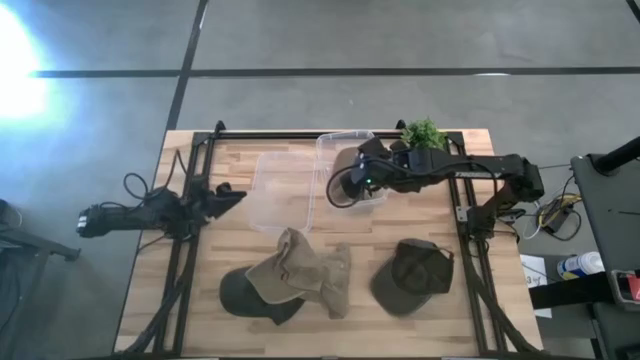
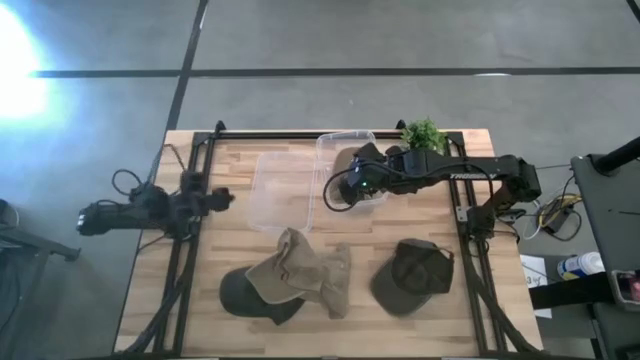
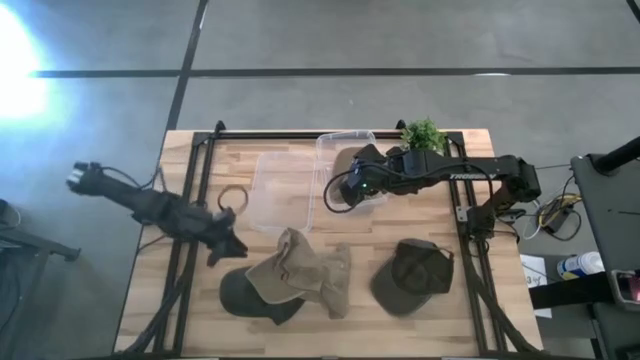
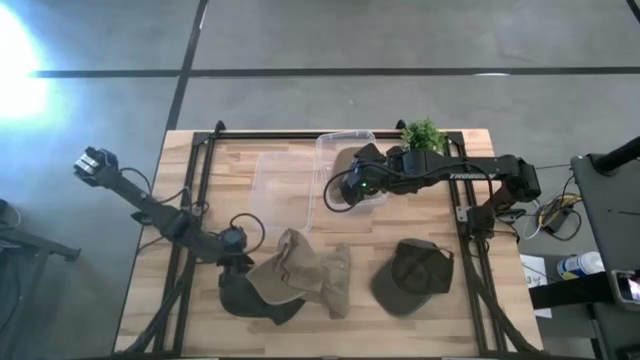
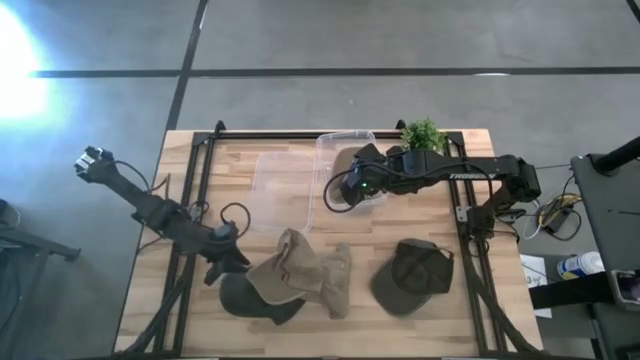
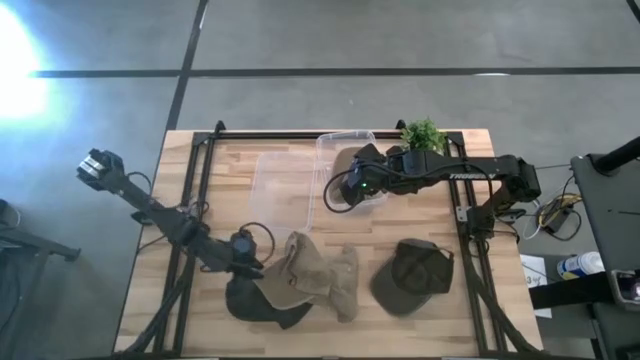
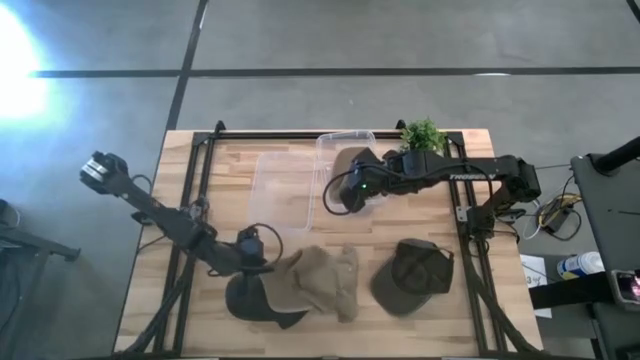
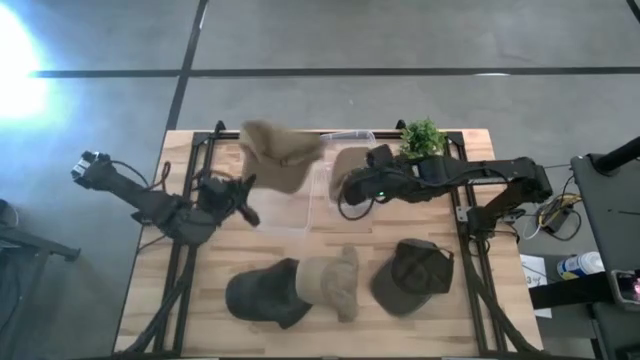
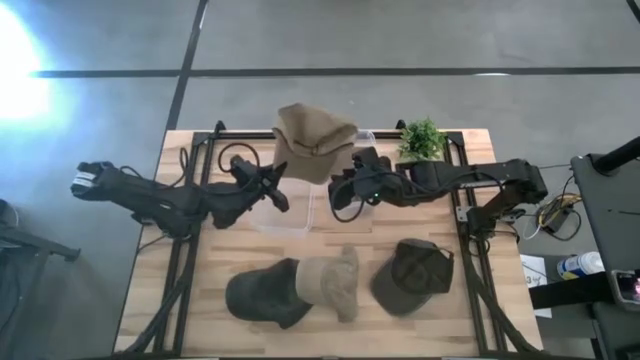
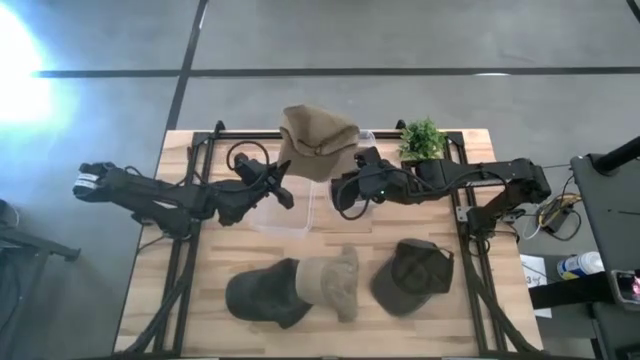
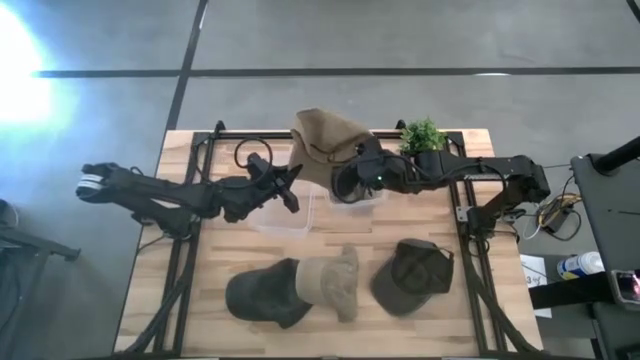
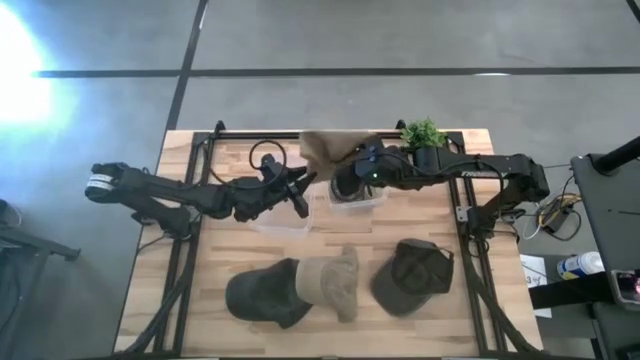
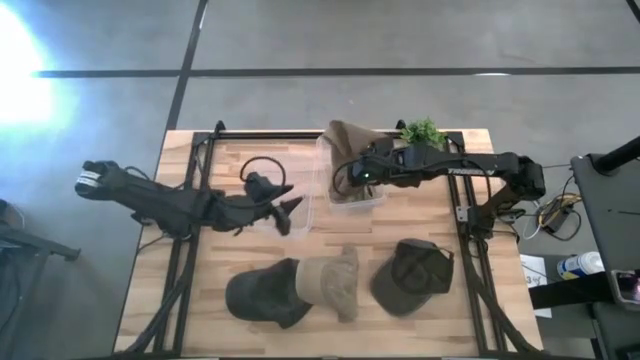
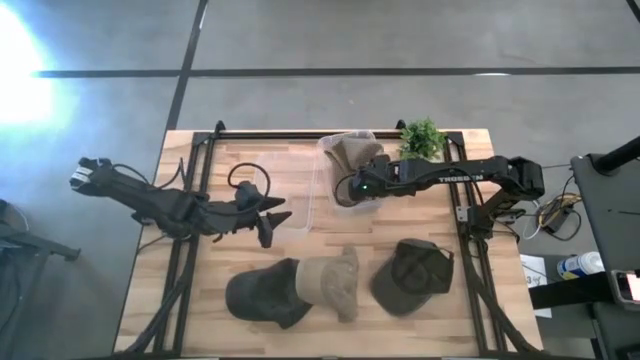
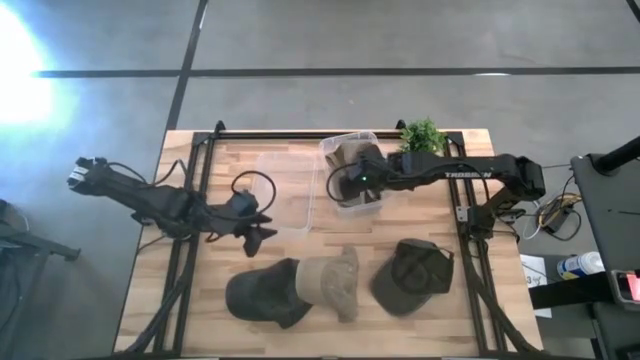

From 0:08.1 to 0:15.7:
Task: Pick & Place hat
Put the left brown cap into the right transparent bin

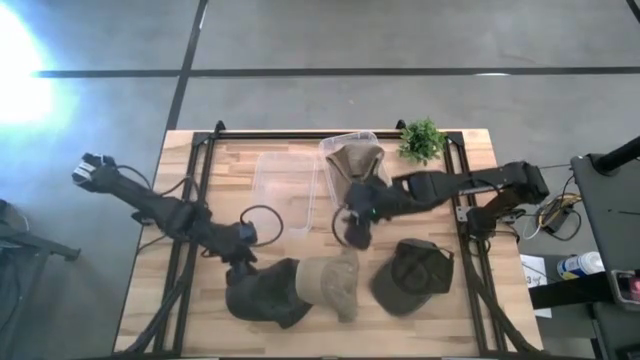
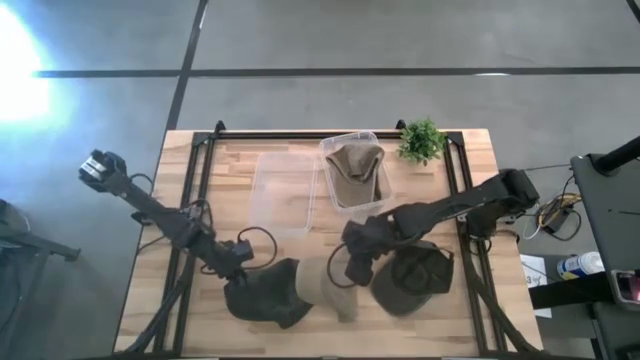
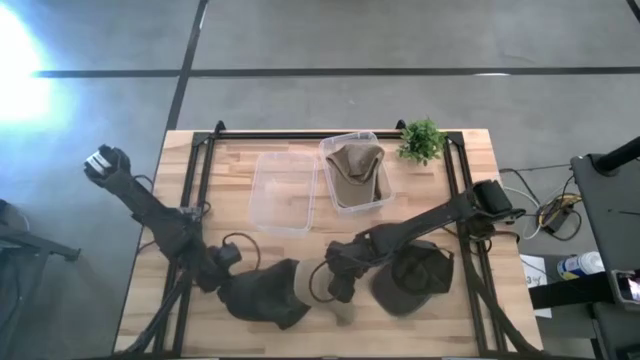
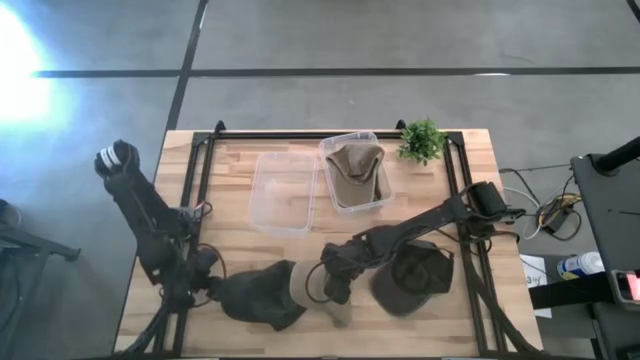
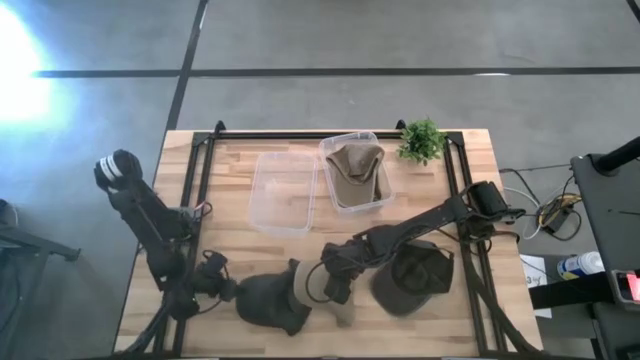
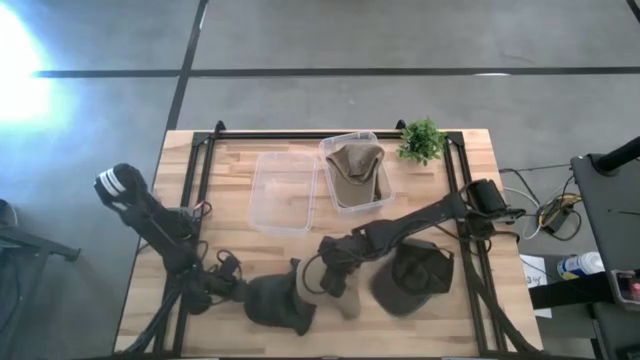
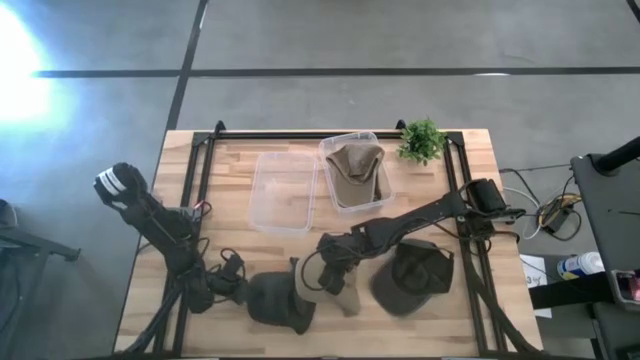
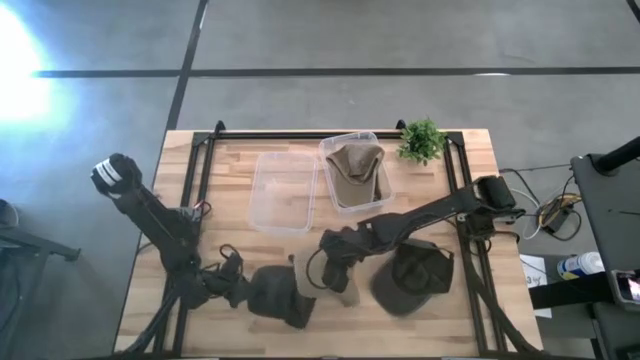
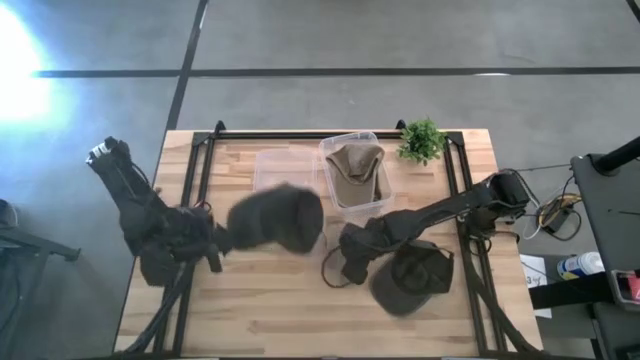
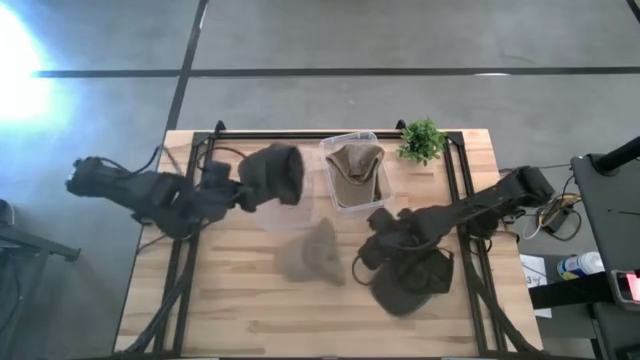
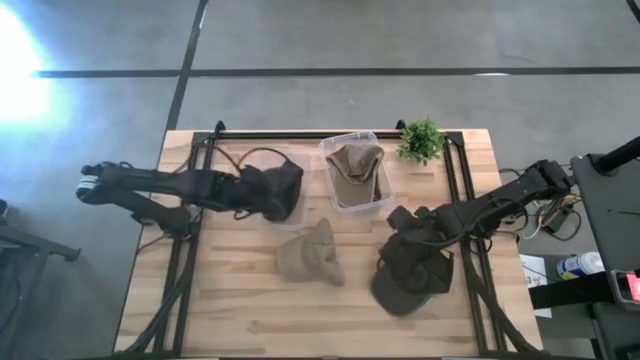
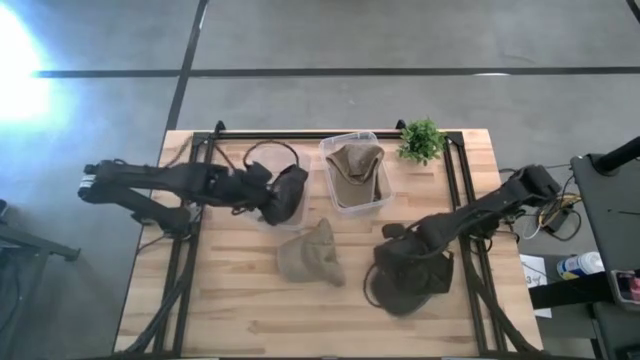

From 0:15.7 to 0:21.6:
Put the left black cap into the left transparent bin

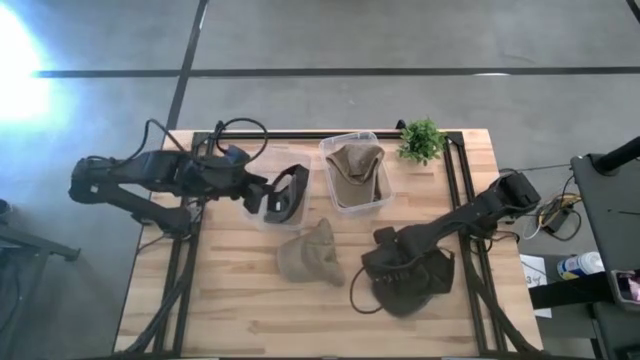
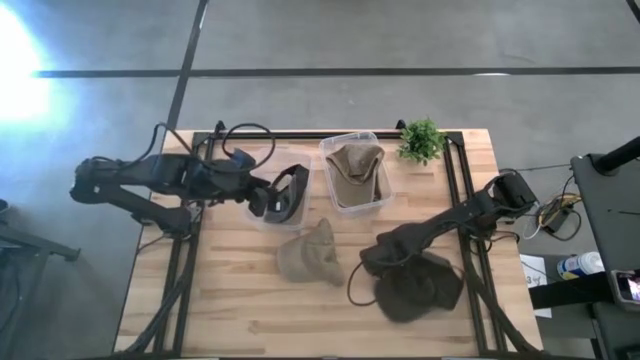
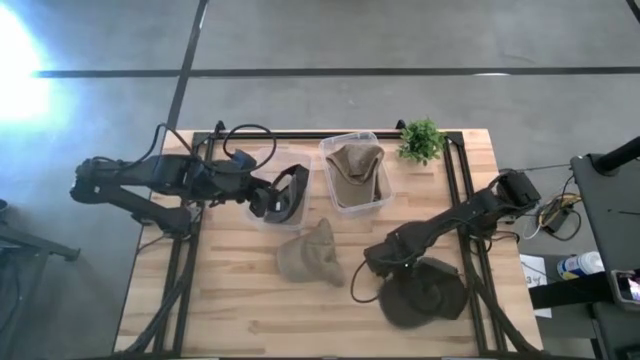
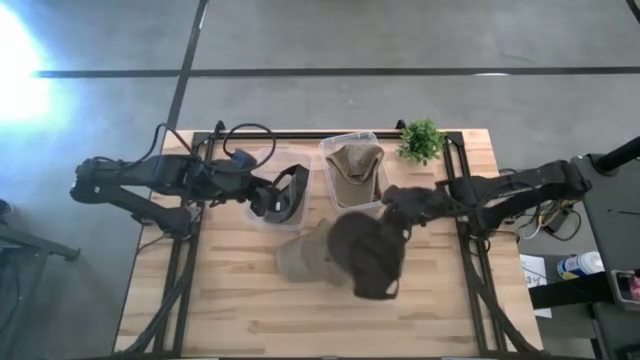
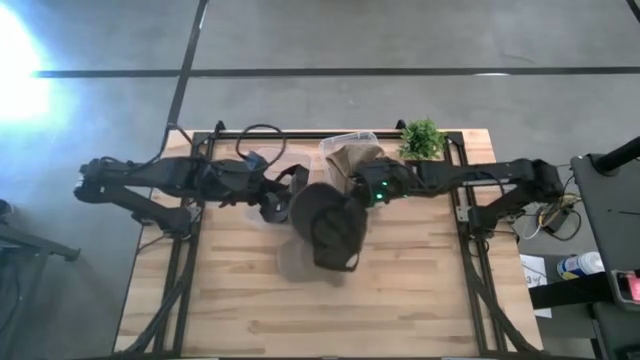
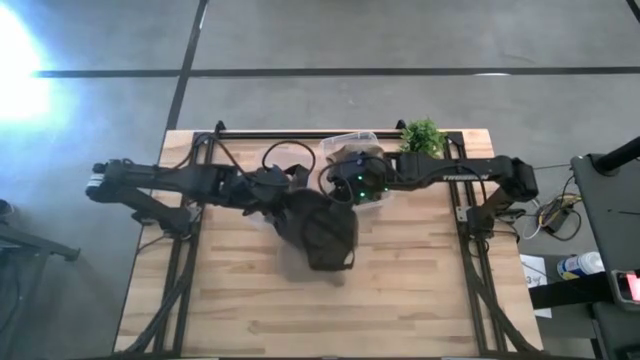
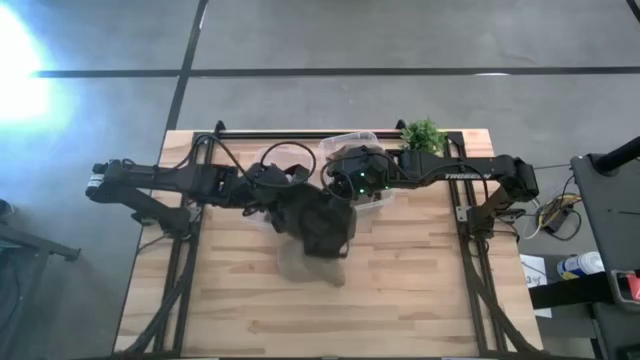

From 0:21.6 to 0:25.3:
Put the black cap into the left transparent bin

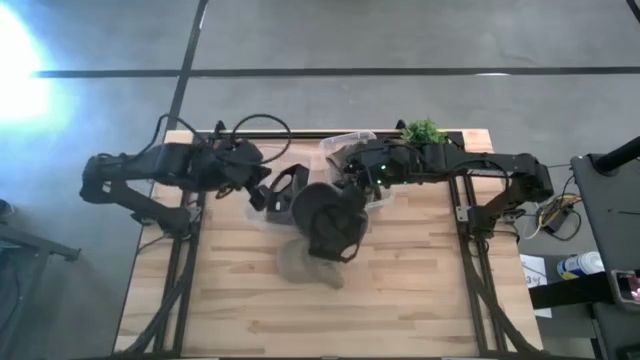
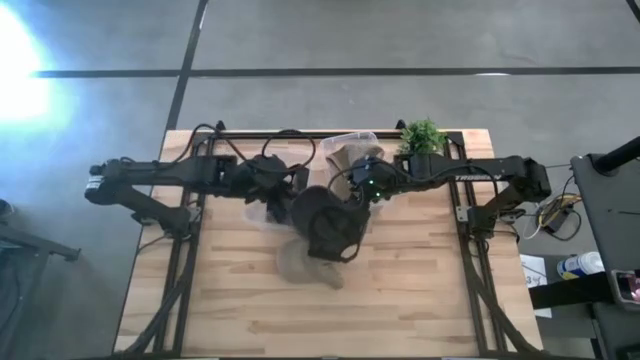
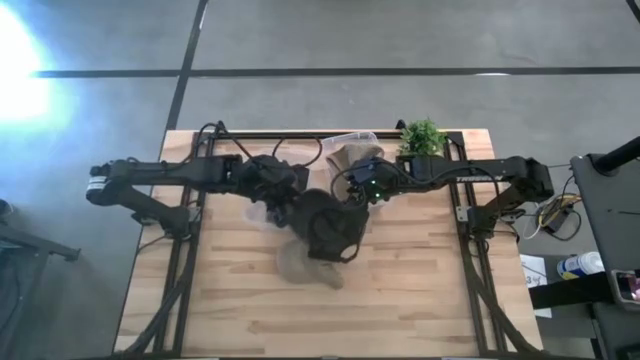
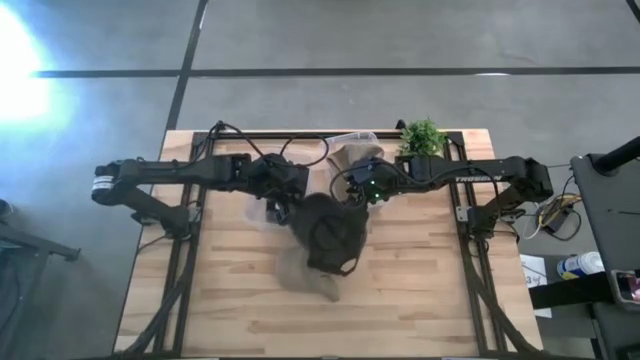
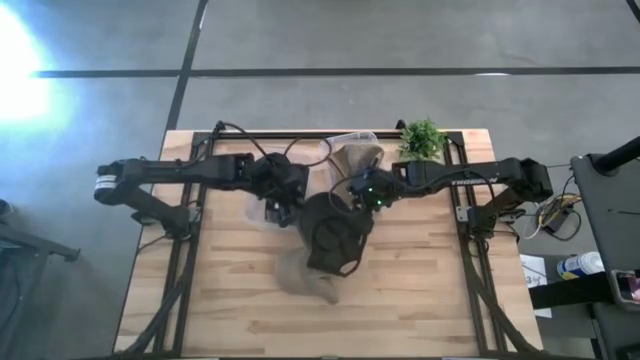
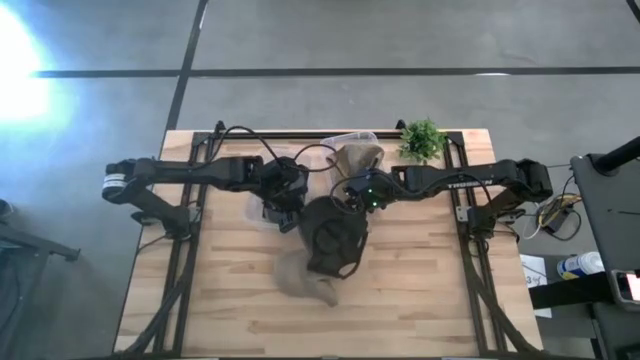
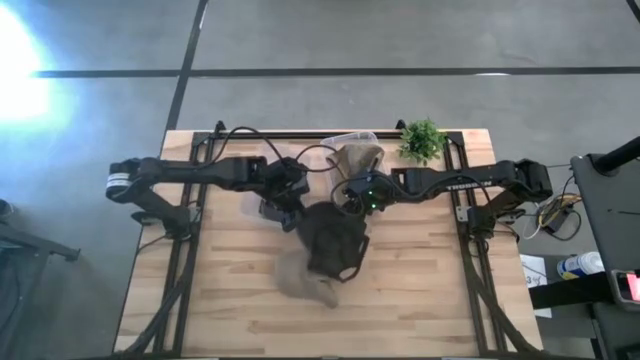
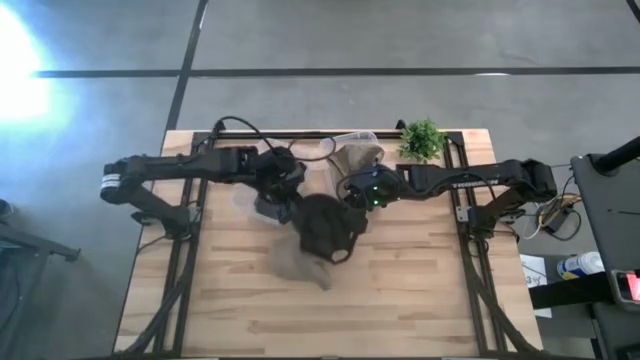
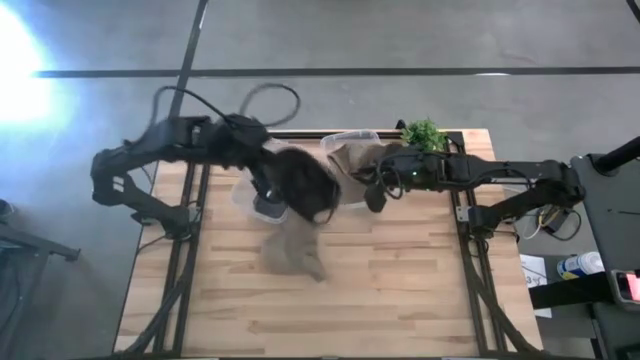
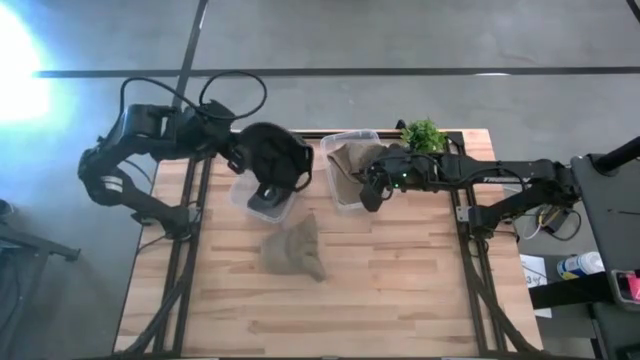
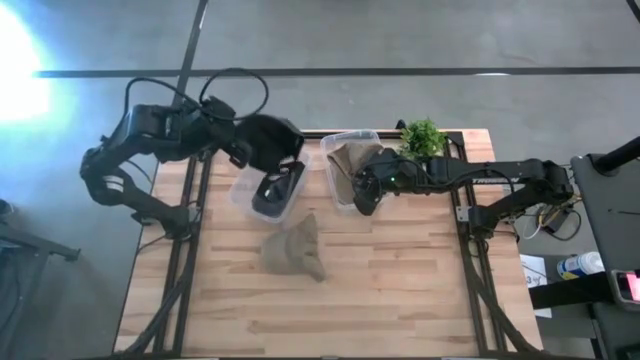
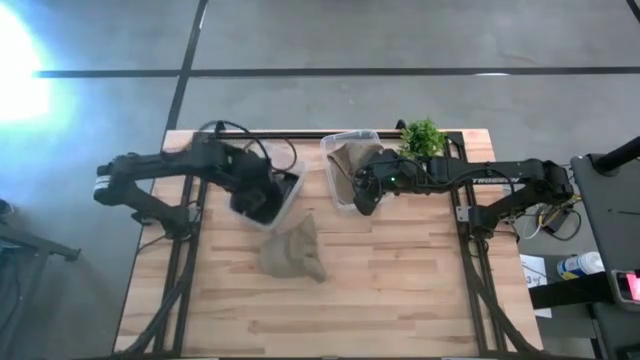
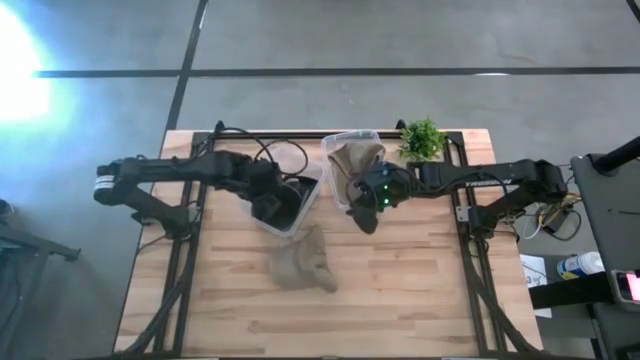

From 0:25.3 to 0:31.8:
Put the black cap into the left transparent bin
